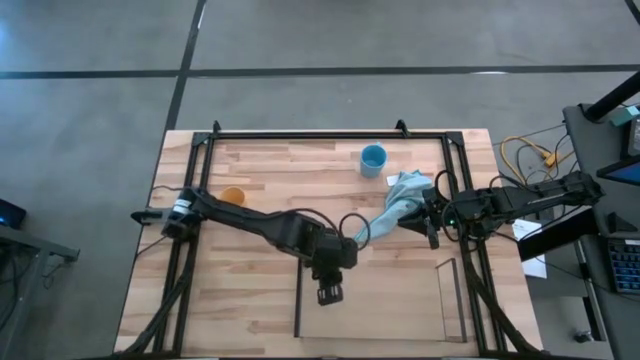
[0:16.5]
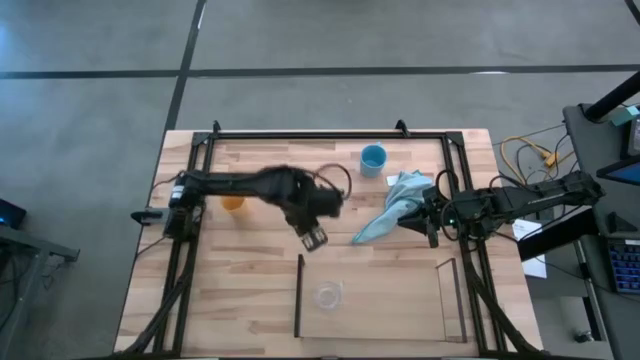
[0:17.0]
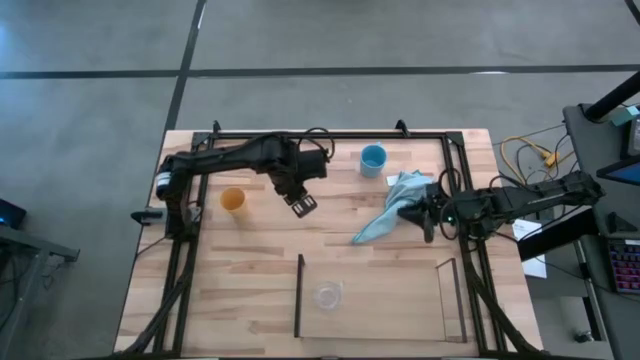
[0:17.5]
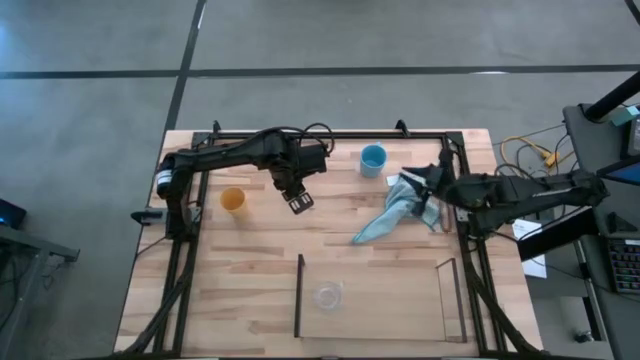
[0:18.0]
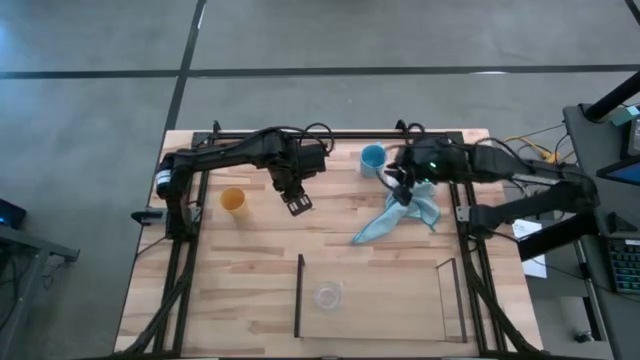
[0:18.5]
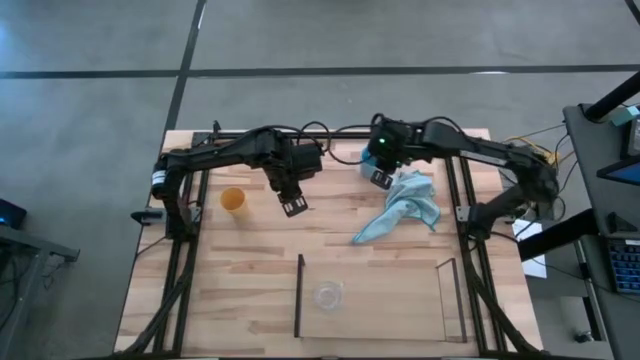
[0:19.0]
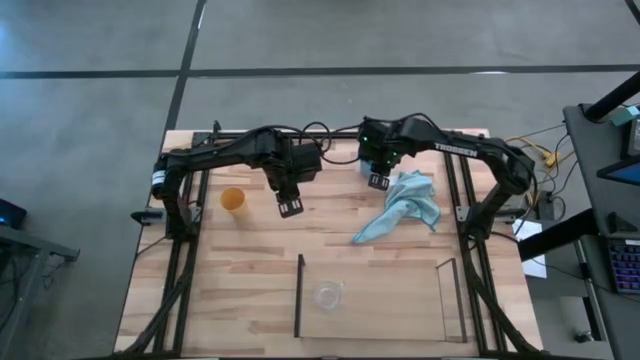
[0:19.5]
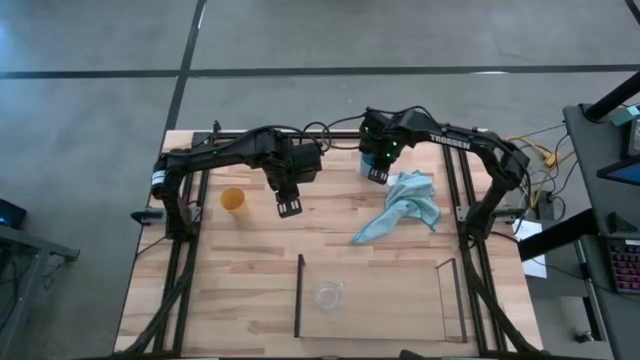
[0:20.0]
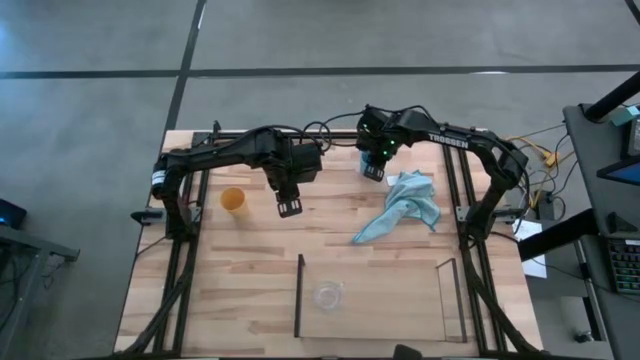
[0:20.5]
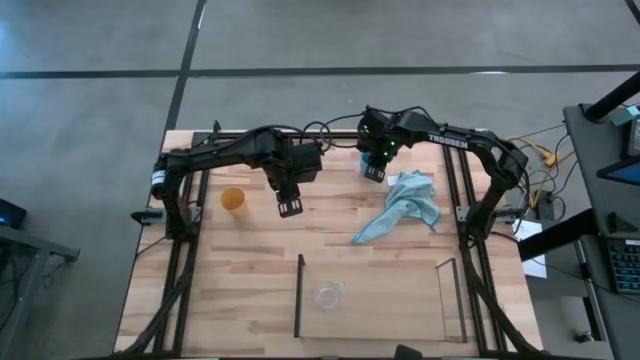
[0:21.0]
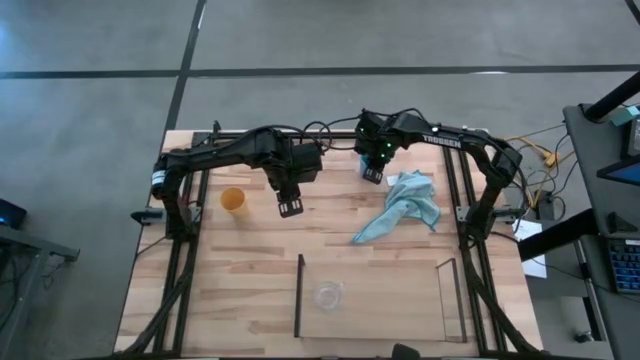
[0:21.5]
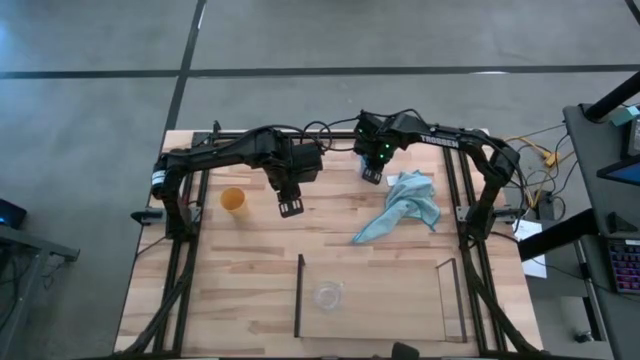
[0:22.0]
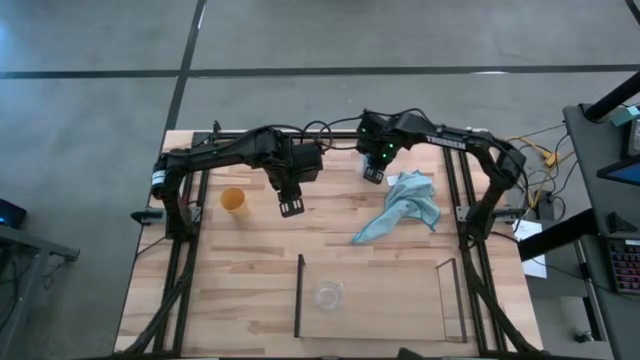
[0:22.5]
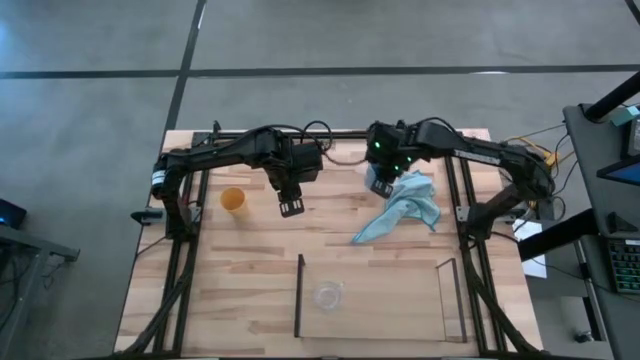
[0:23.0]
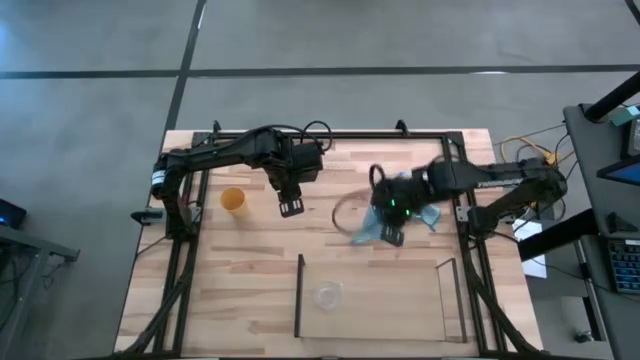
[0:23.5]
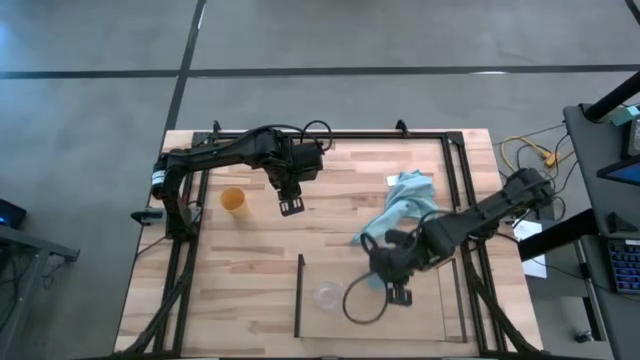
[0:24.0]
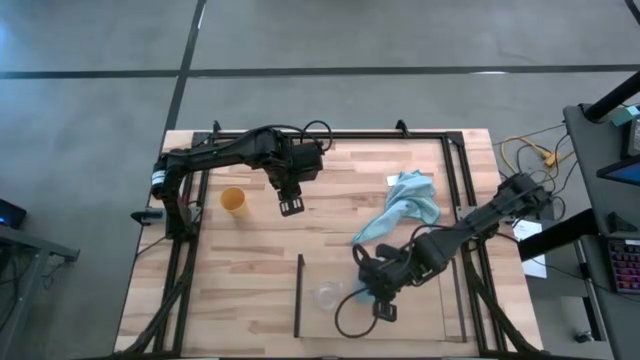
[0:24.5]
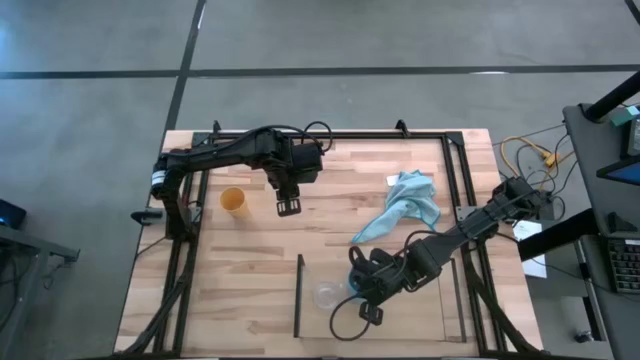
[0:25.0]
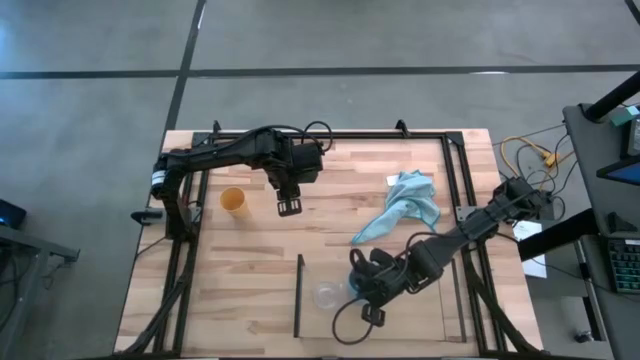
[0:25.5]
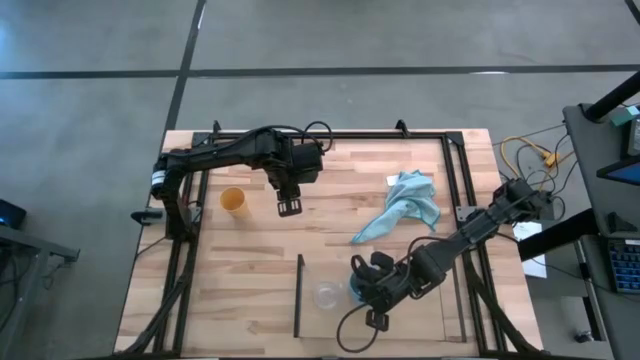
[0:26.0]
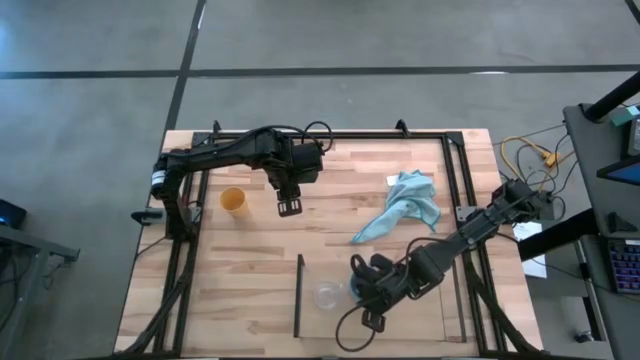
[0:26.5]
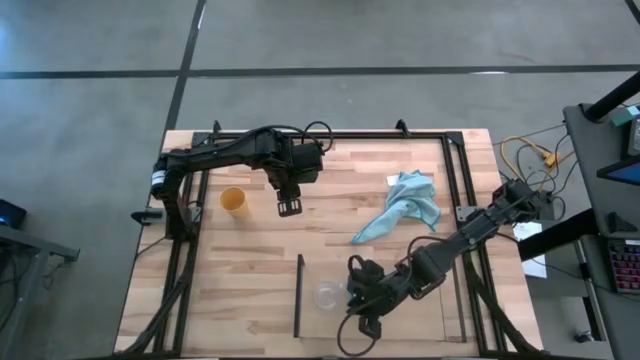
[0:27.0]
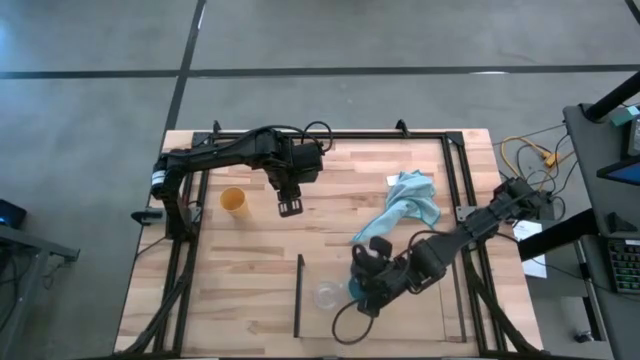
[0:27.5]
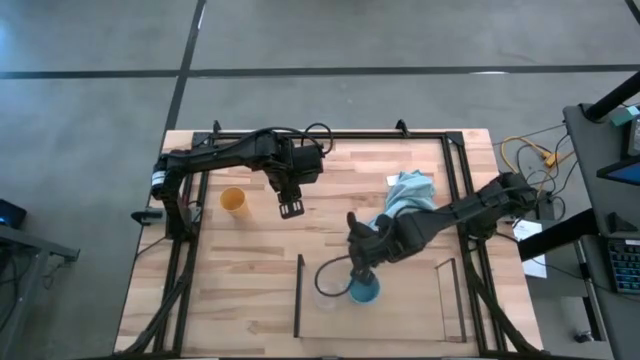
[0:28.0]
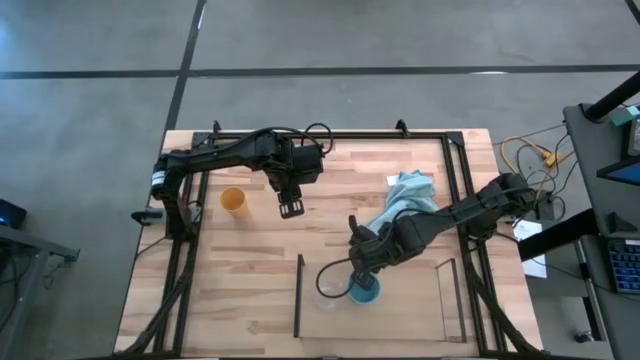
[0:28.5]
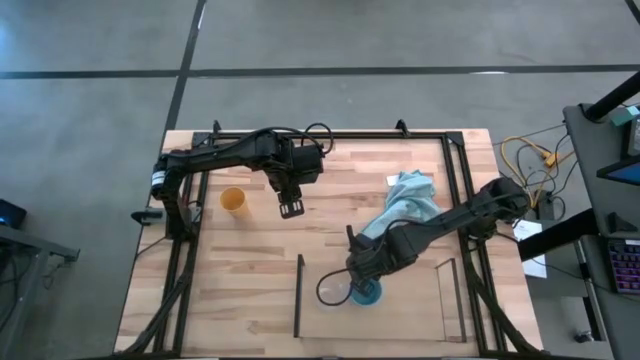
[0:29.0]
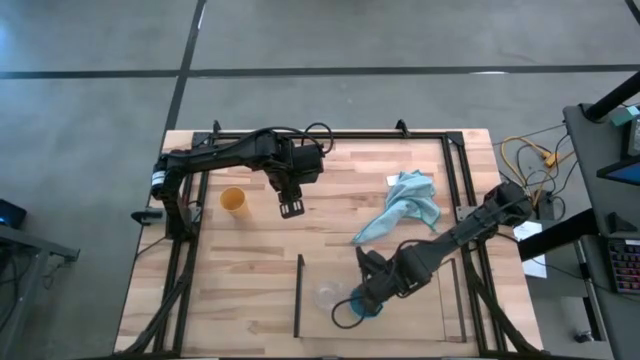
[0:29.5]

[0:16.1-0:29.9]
Task: Stack small to large cups/mugs on shelf
Put the blue cup on the shelf

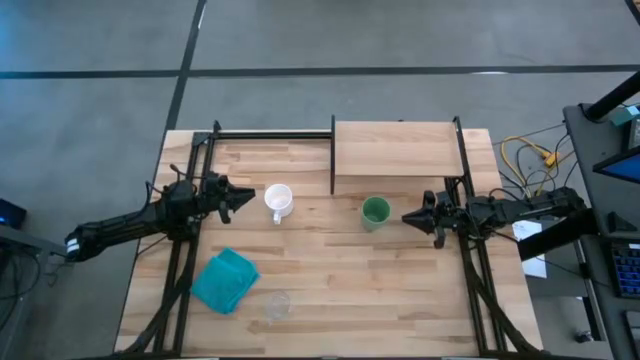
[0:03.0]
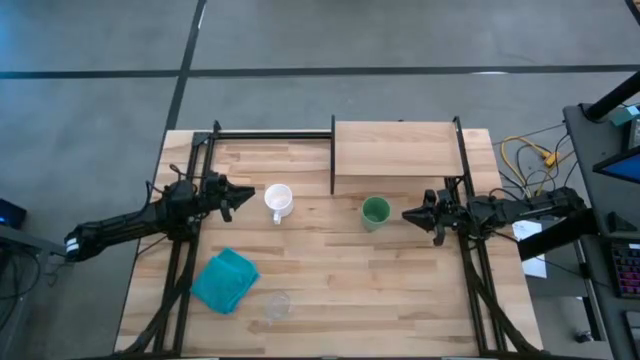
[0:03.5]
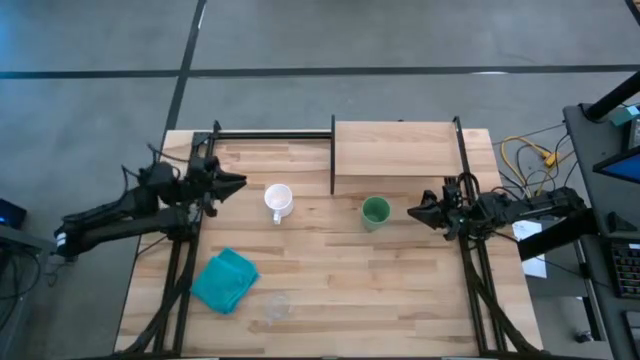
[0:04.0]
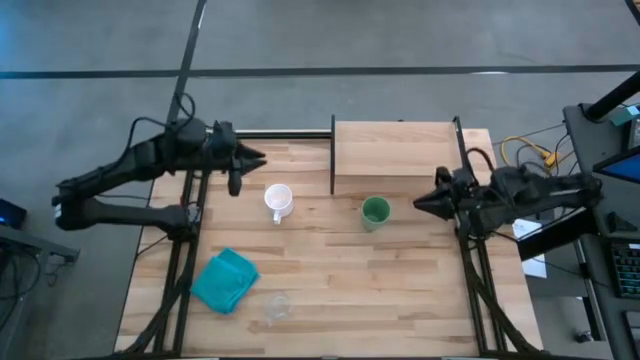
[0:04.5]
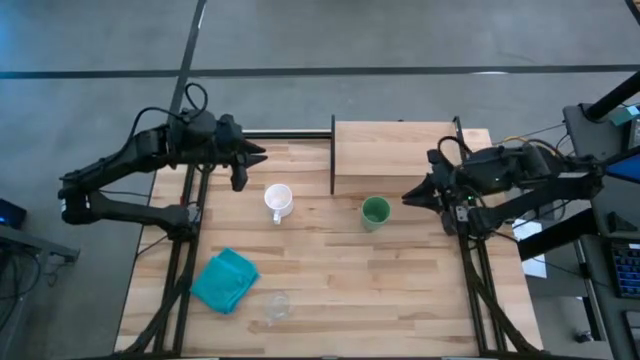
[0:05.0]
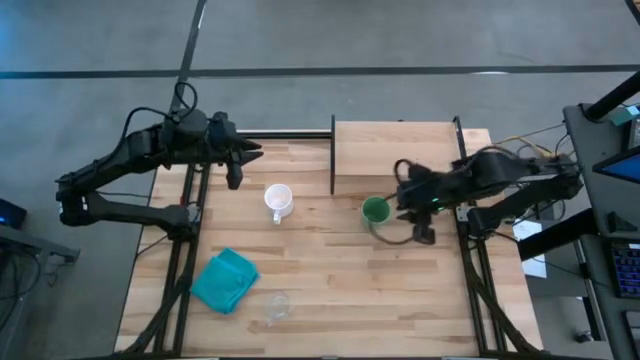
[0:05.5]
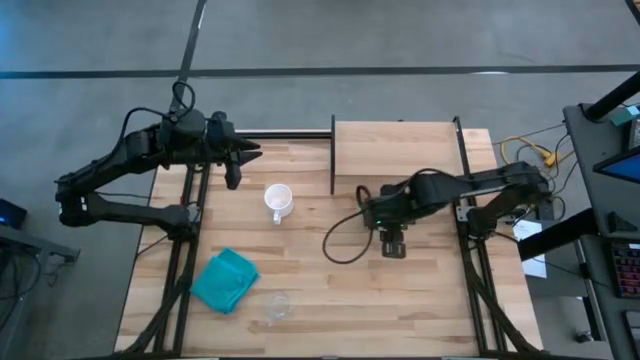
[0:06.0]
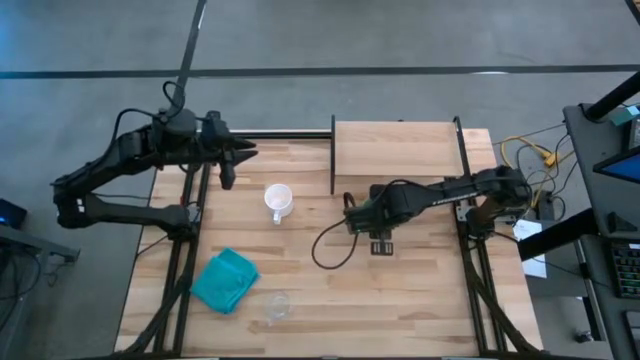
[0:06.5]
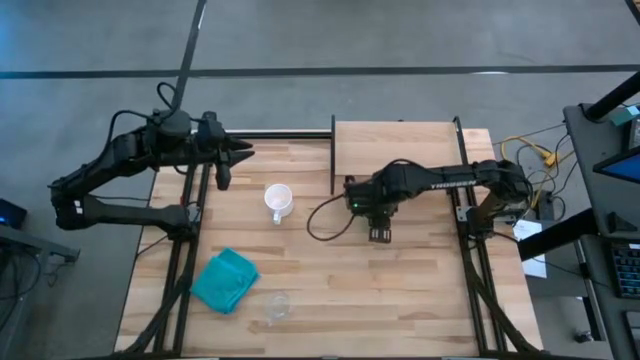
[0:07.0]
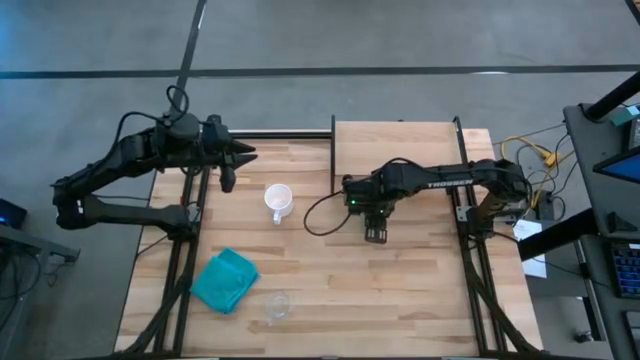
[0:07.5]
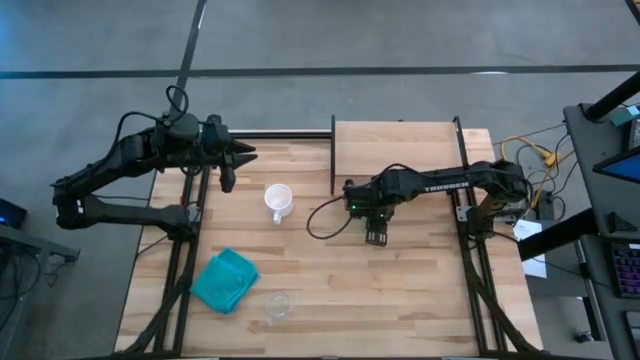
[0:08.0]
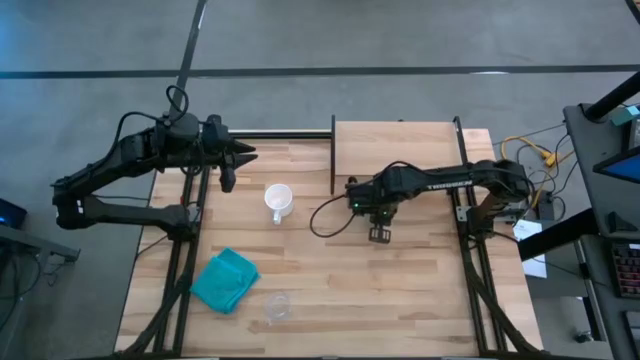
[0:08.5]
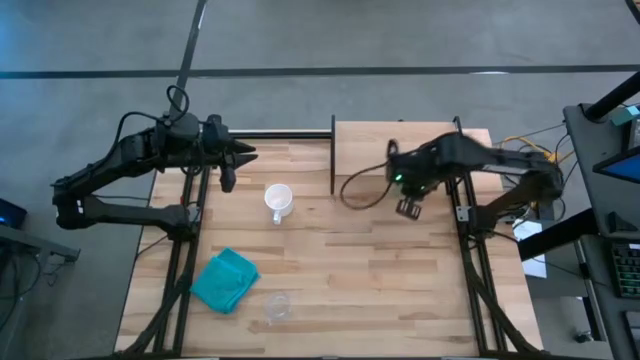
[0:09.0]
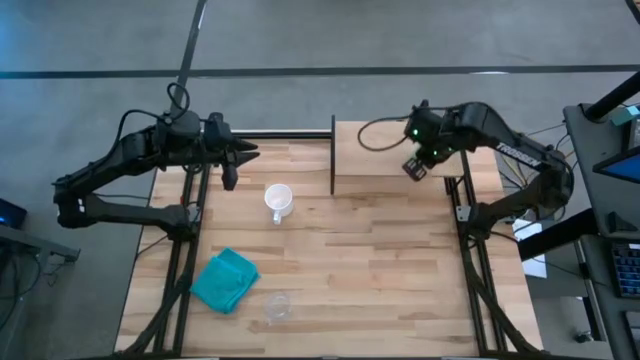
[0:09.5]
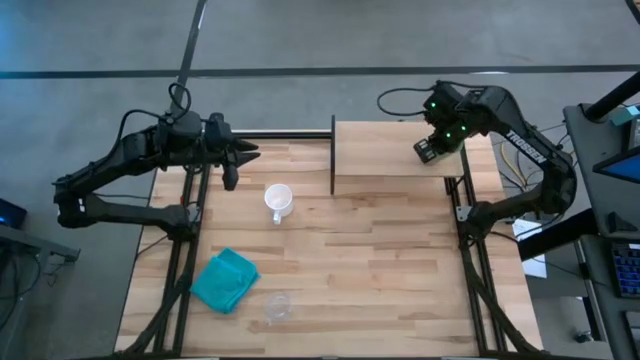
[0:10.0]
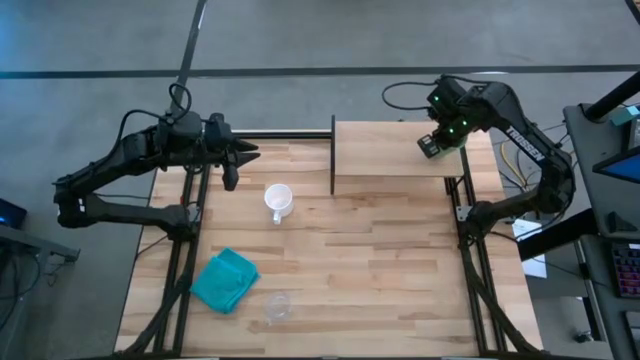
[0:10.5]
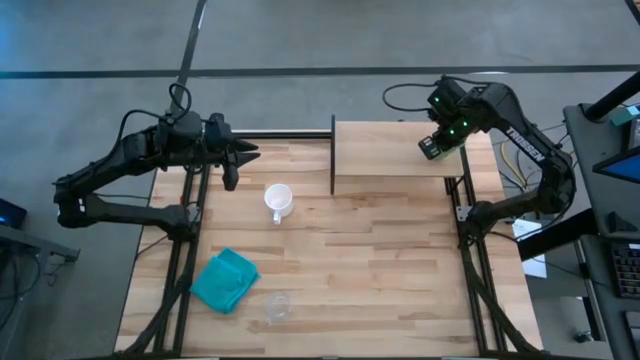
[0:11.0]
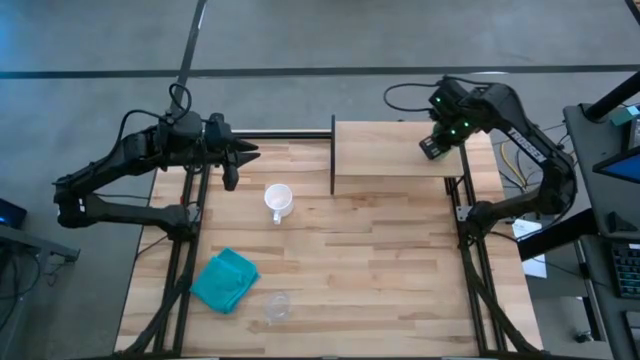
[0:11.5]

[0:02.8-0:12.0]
Task: Stack small to large cups/mugs on shelf
Put the green cup on the shelf
